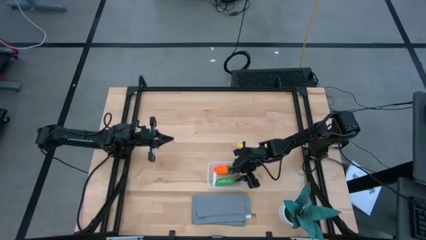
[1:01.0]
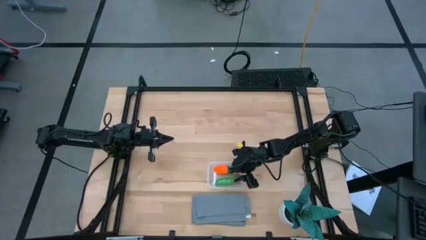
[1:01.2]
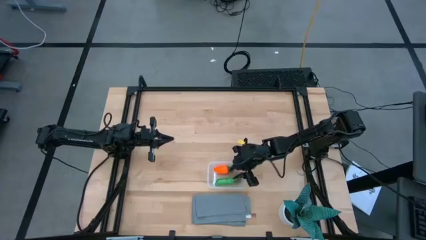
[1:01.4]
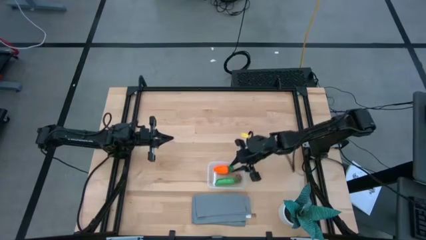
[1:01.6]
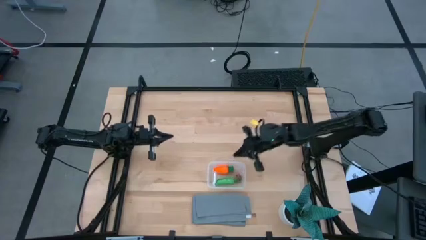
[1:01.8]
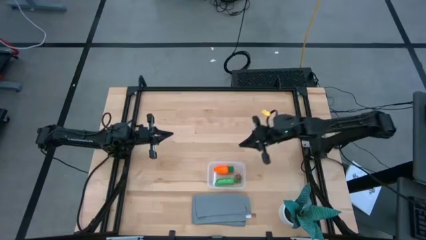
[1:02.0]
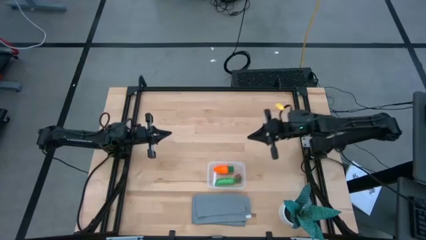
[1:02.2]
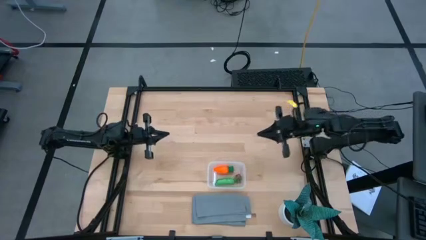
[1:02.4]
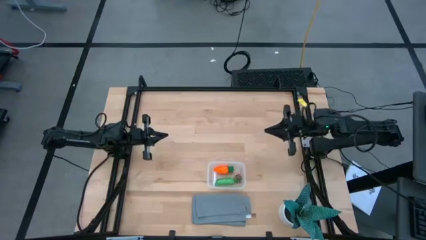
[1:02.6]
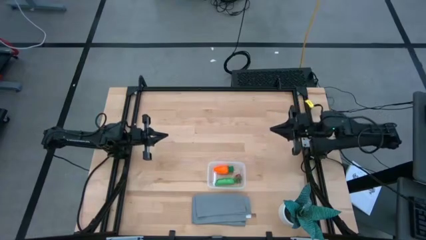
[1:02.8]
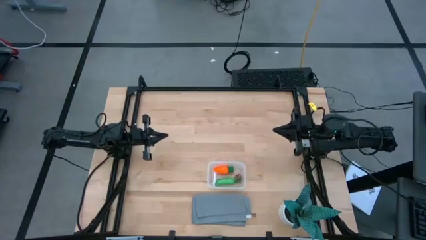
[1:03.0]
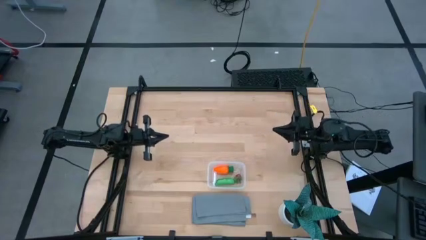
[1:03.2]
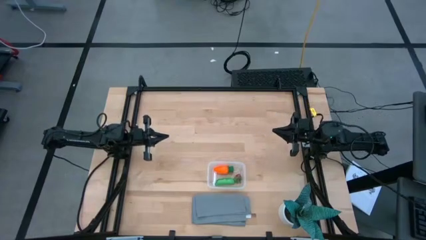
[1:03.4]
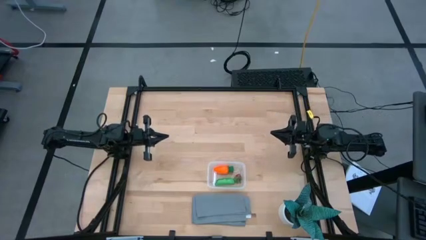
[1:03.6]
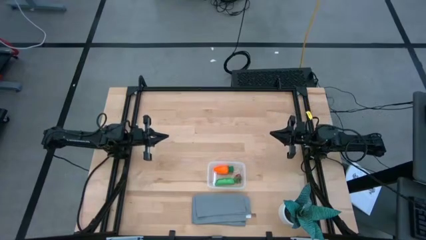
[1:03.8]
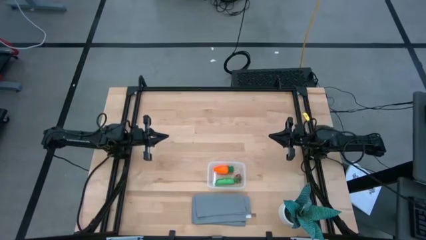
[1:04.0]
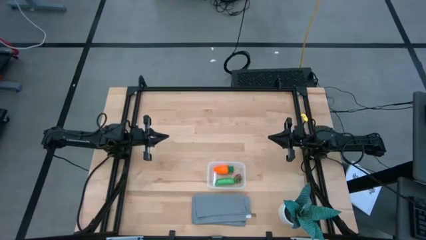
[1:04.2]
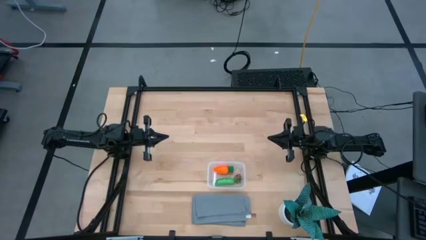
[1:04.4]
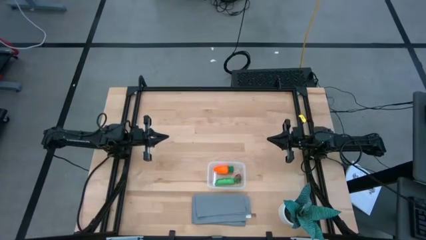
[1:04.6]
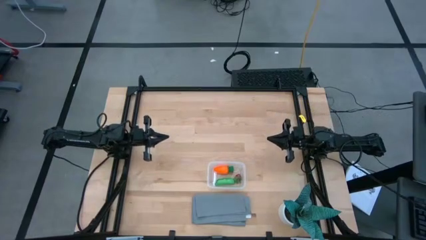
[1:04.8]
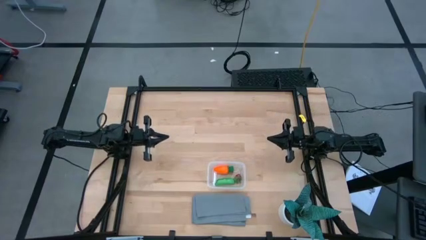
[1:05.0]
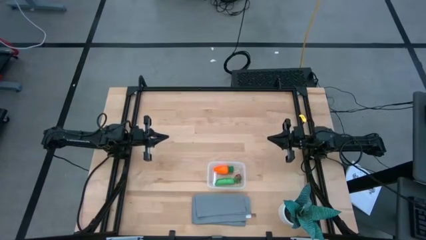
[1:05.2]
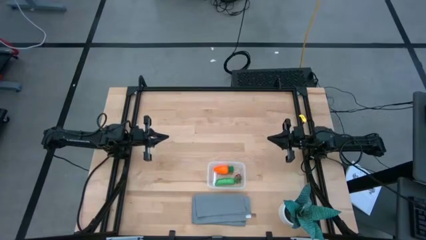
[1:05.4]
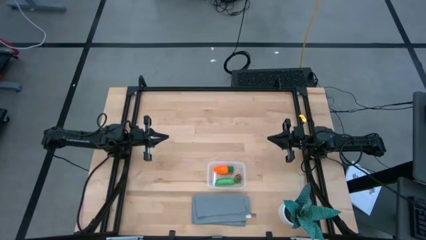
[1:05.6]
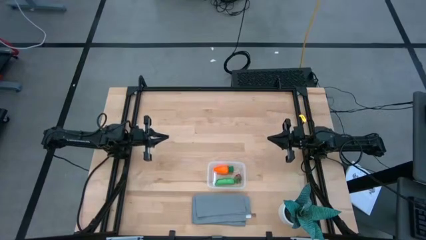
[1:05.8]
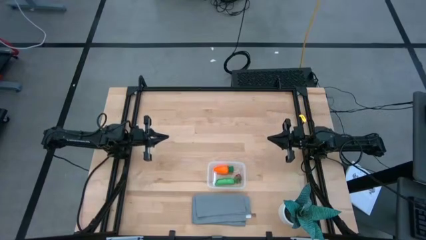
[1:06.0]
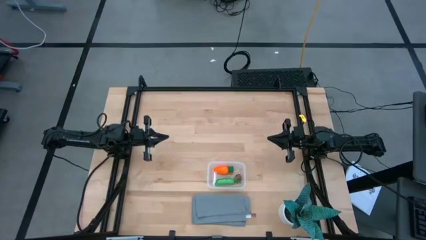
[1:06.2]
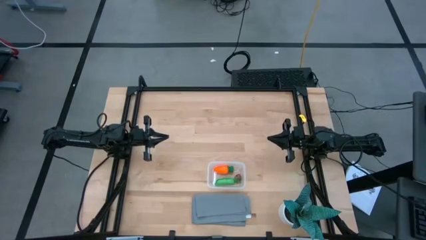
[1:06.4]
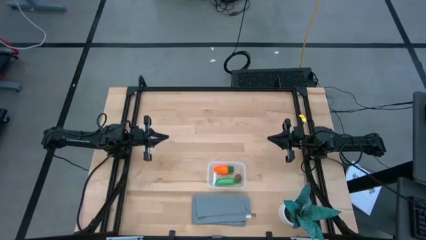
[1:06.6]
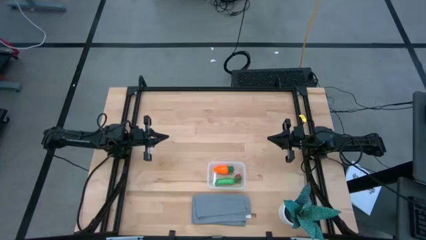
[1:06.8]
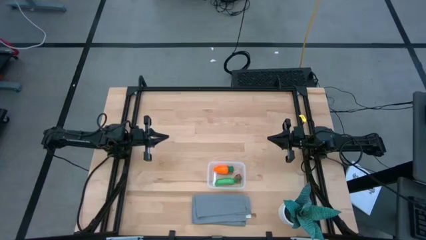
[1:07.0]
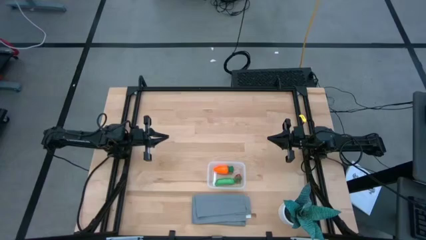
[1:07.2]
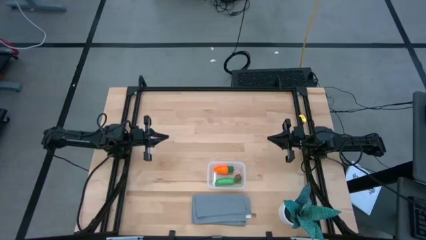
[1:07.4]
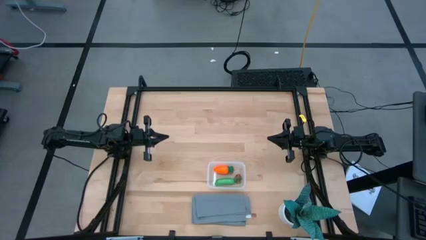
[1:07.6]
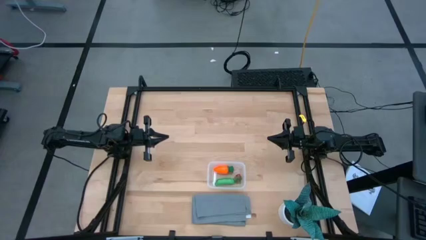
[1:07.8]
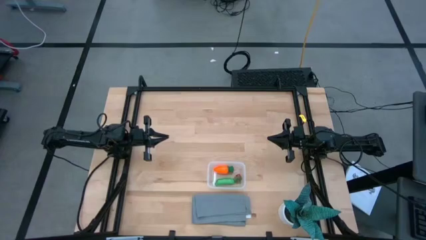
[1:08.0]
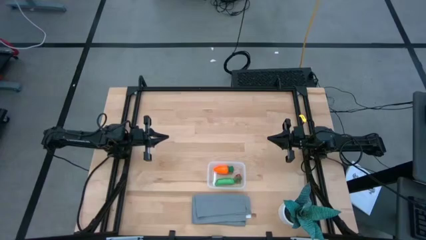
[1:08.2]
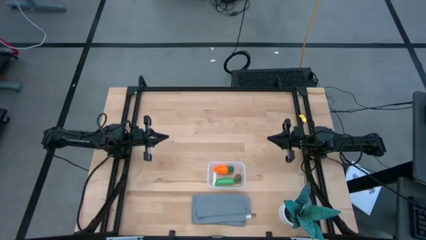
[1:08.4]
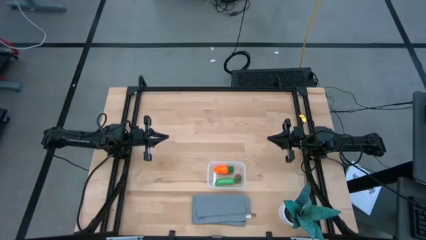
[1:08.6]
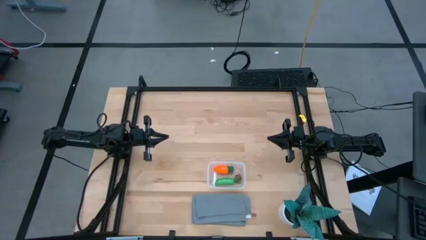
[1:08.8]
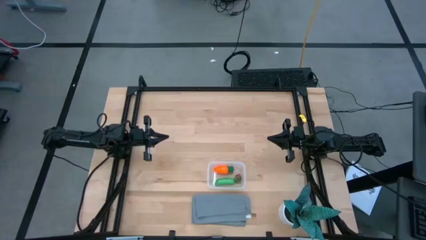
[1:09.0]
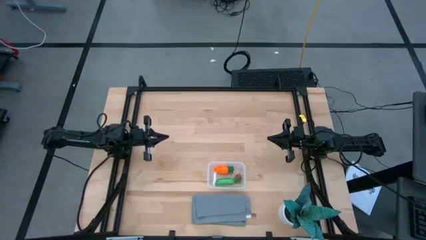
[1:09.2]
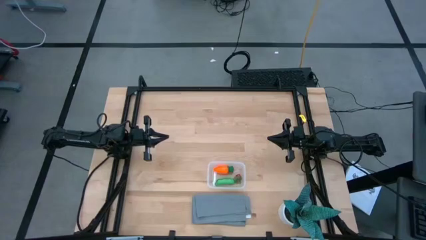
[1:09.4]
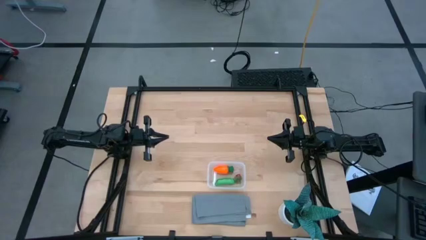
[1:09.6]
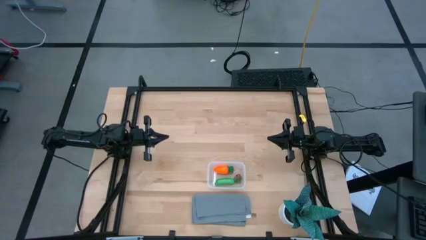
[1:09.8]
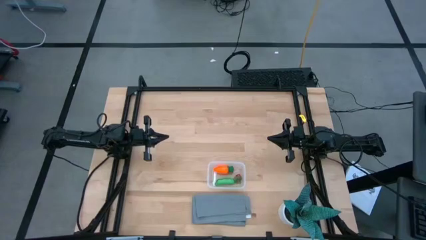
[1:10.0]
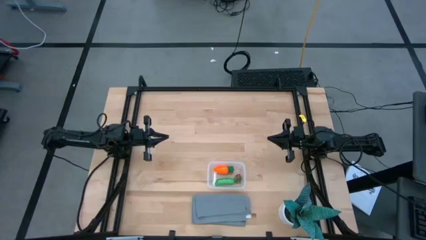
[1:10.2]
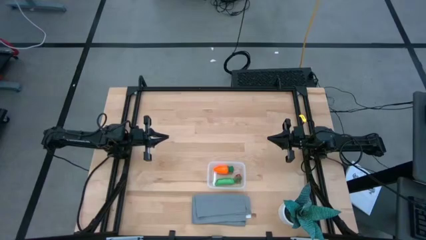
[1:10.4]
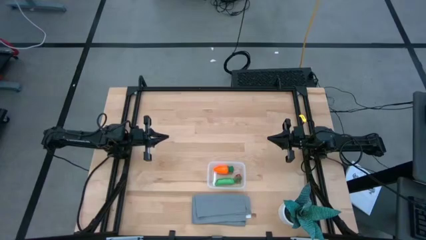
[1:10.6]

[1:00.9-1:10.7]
Task: Pick and placing Produce into tupperware
Return to Home Position
